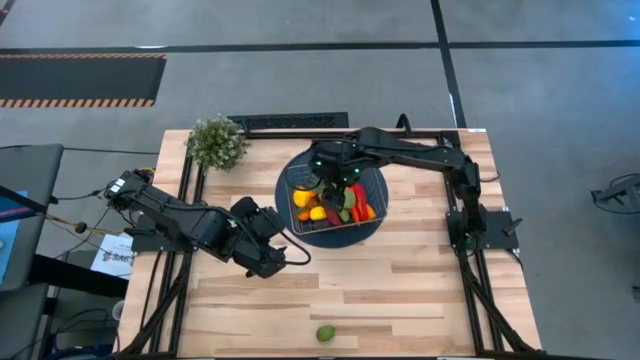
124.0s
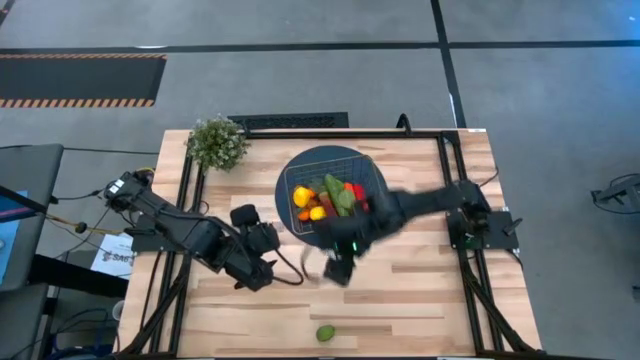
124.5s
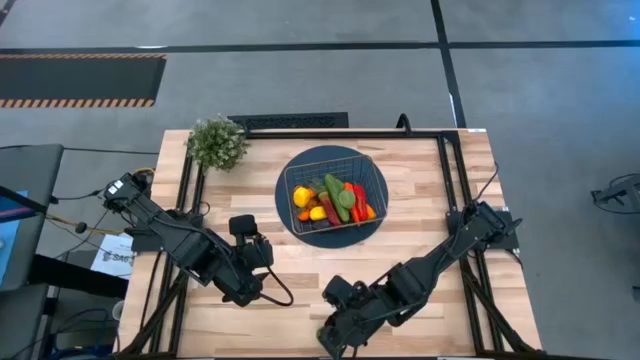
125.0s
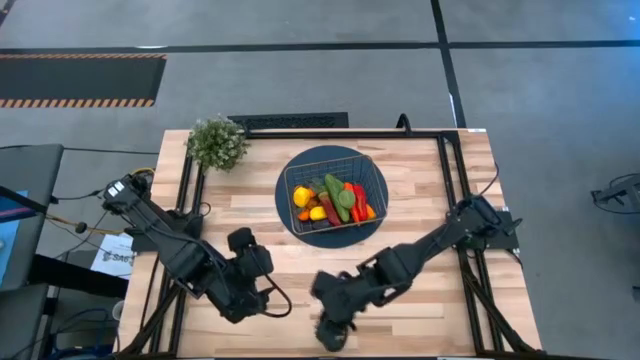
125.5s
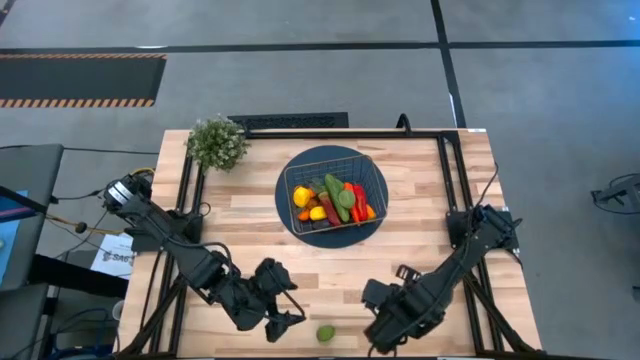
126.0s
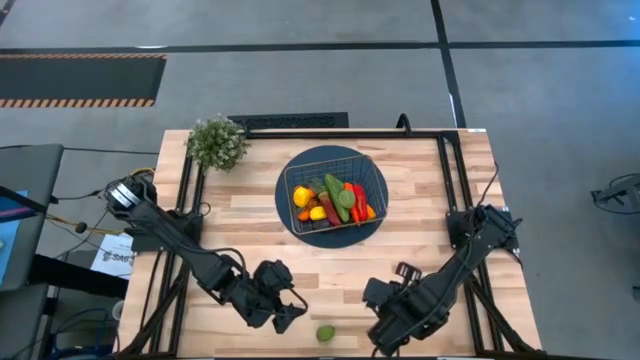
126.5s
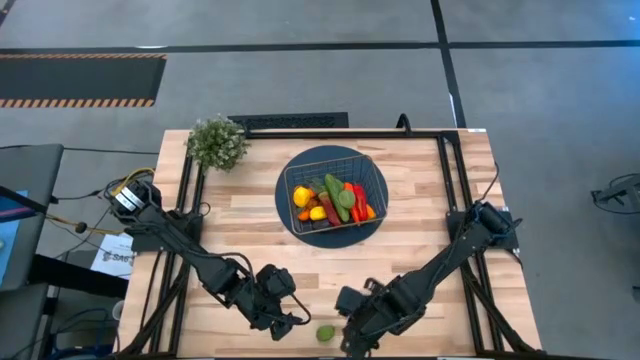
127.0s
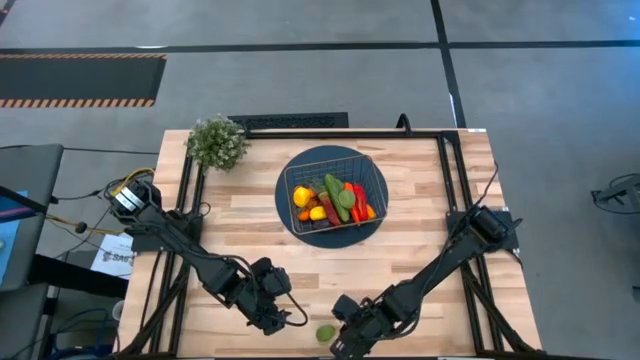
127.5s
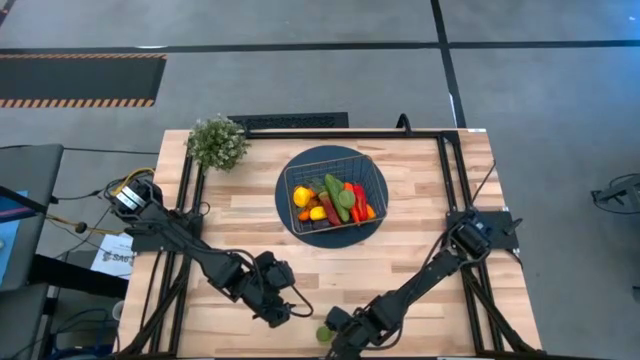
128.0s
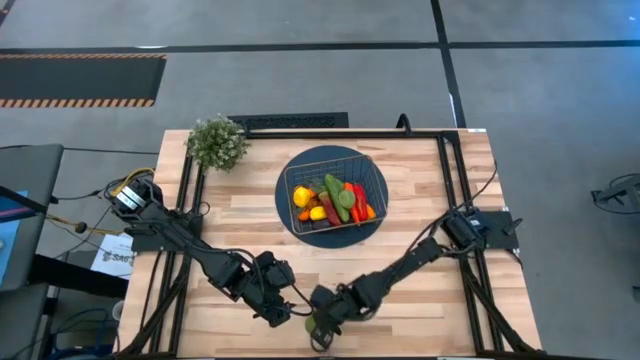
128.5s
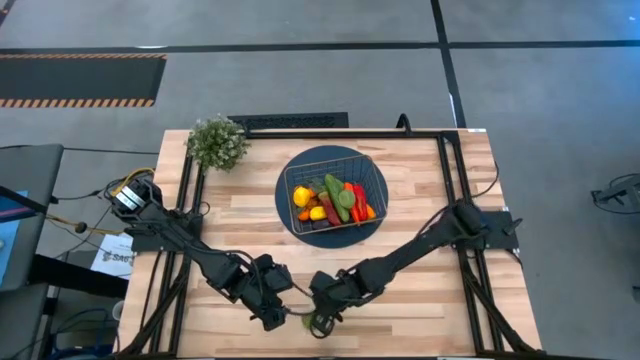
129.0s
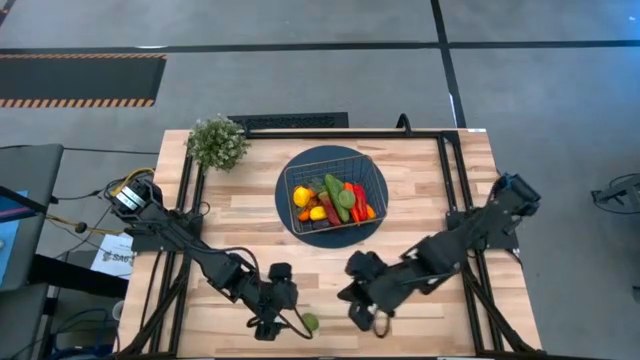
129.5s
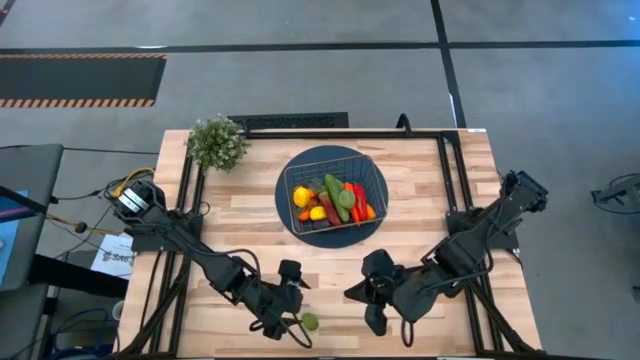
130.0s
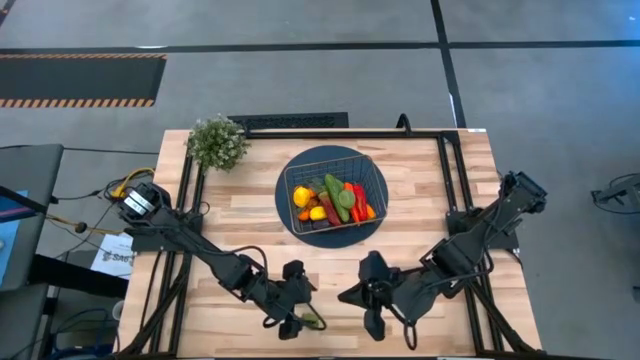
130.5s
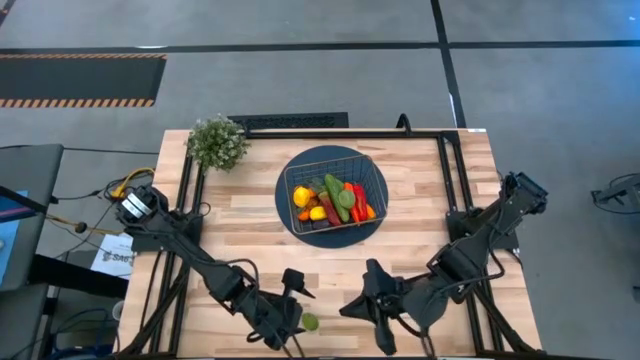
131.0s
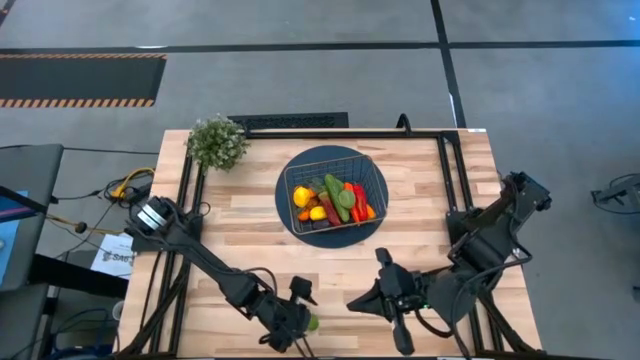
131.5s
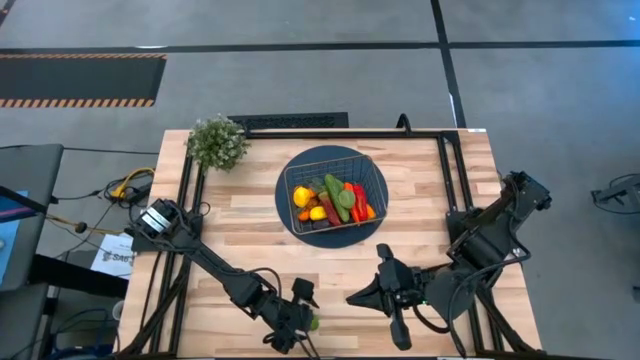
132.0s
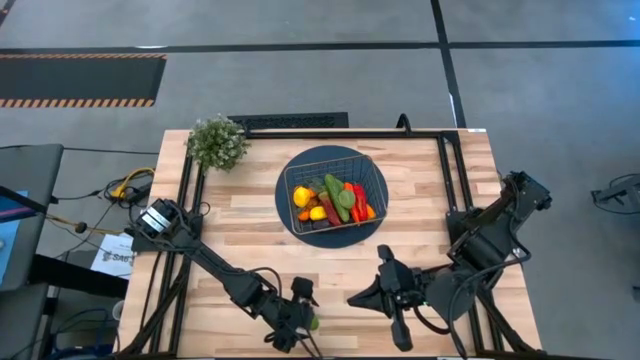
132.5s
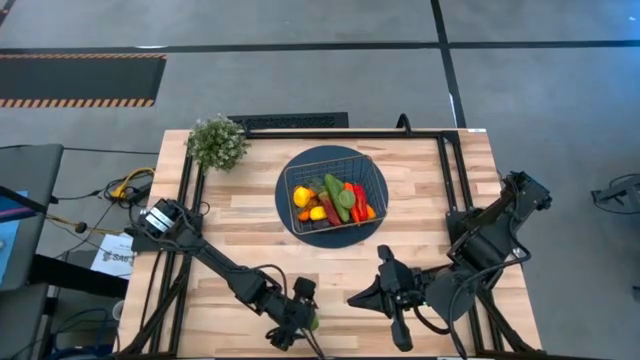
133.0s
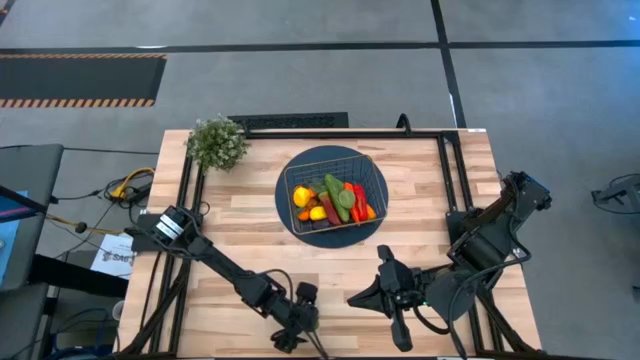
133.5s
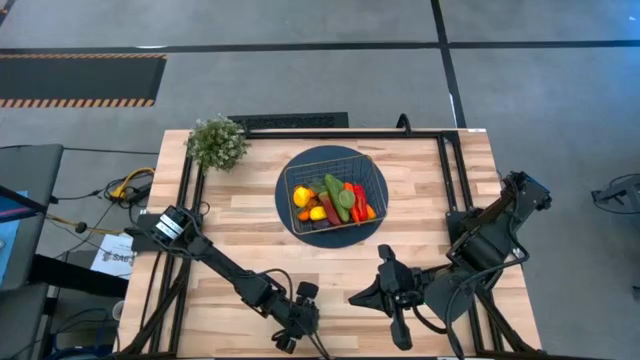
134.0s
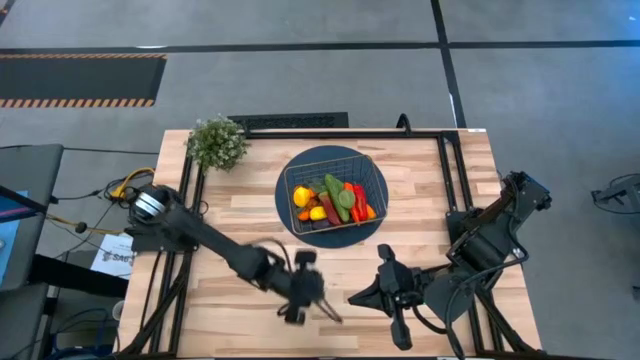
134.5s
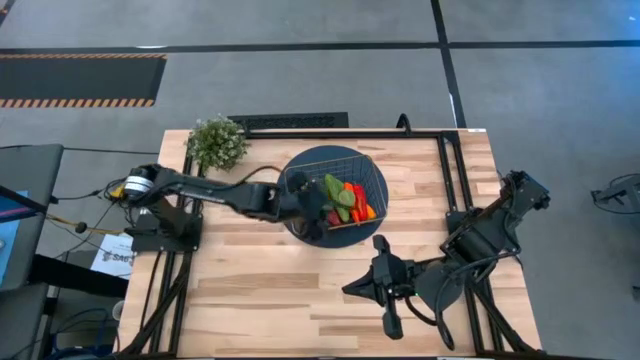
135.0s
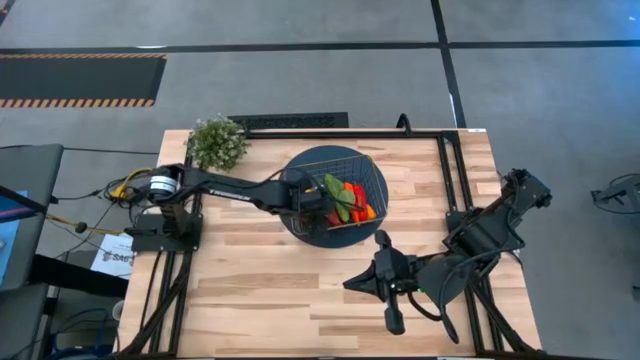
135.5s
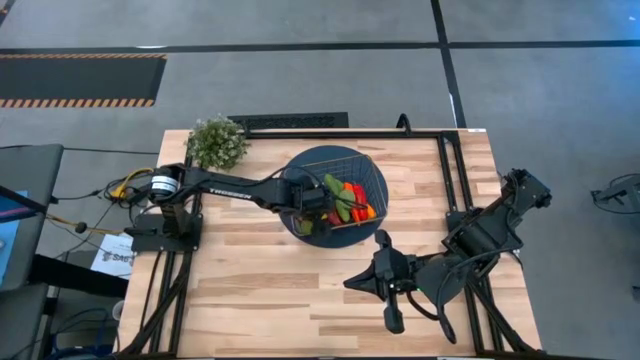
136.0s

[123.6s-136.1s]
Task: Build produce basket
Put the green lemon into the basket

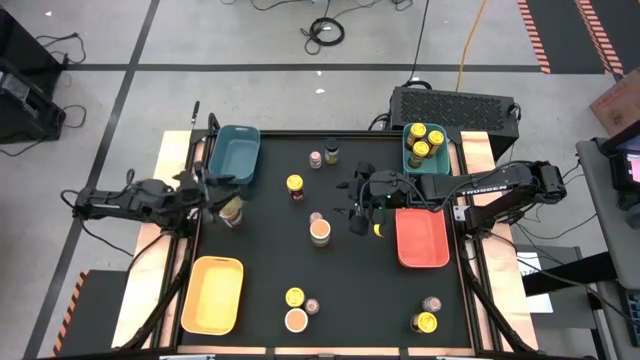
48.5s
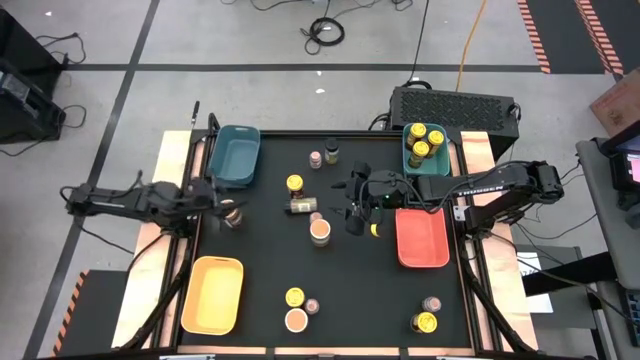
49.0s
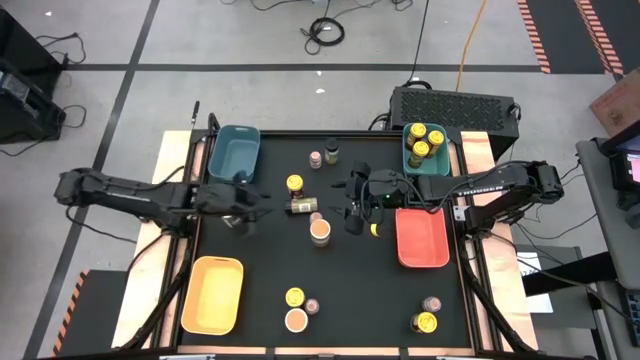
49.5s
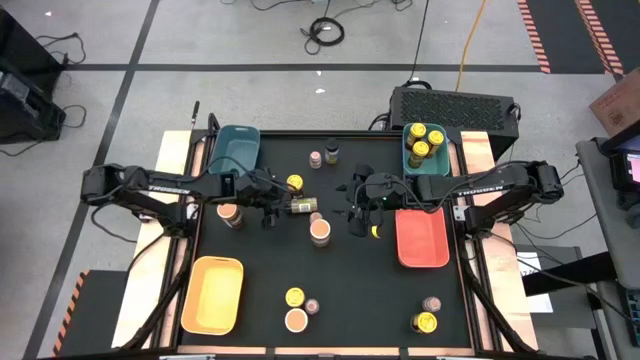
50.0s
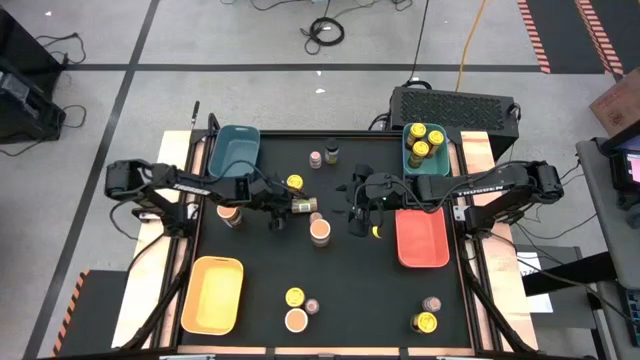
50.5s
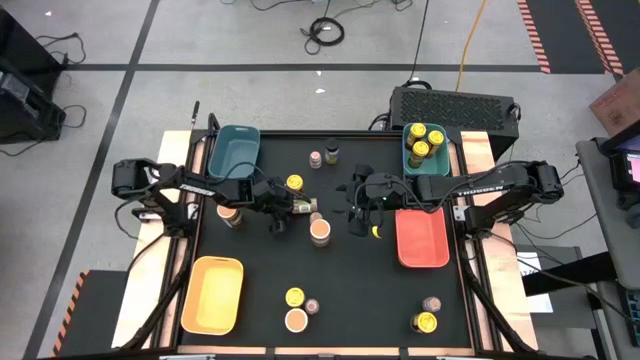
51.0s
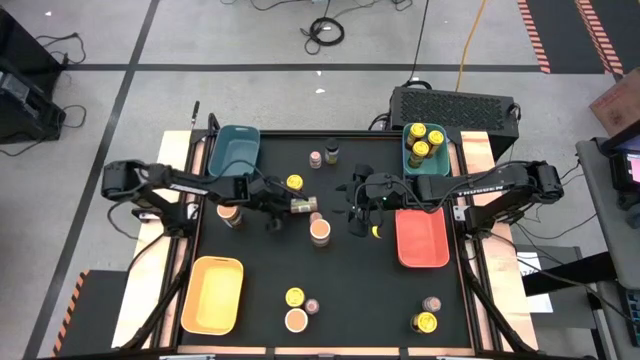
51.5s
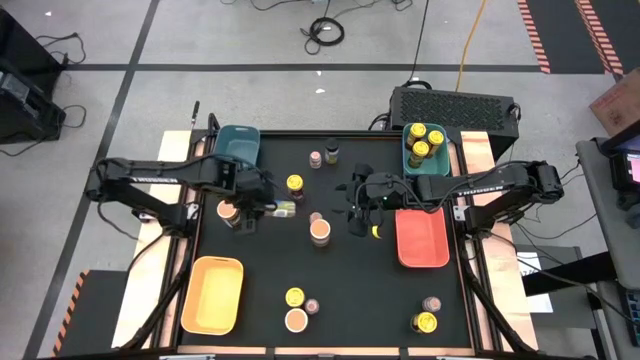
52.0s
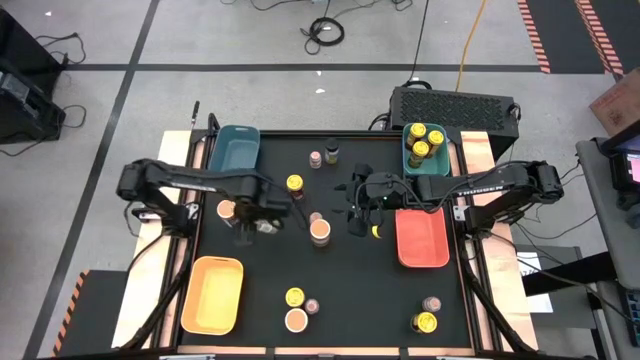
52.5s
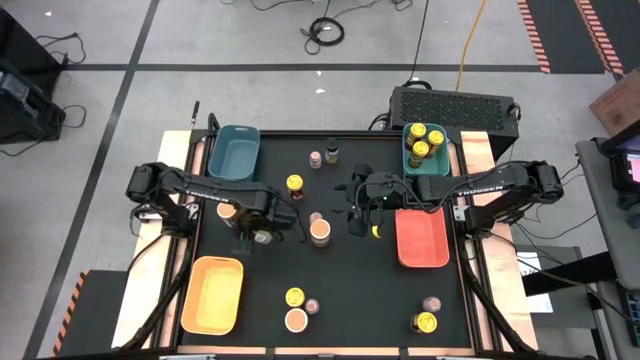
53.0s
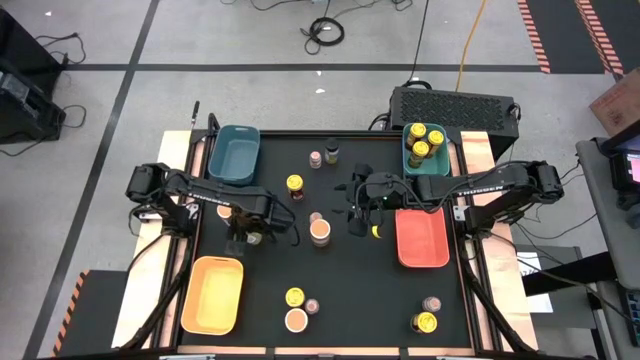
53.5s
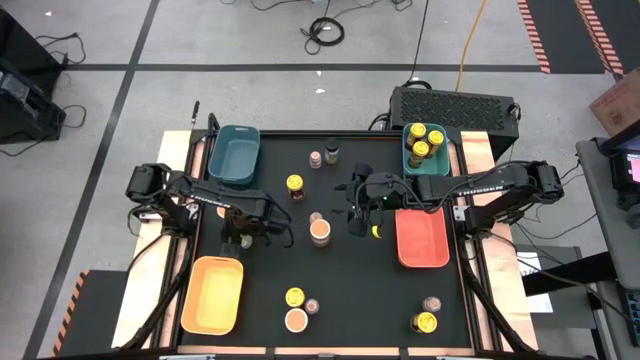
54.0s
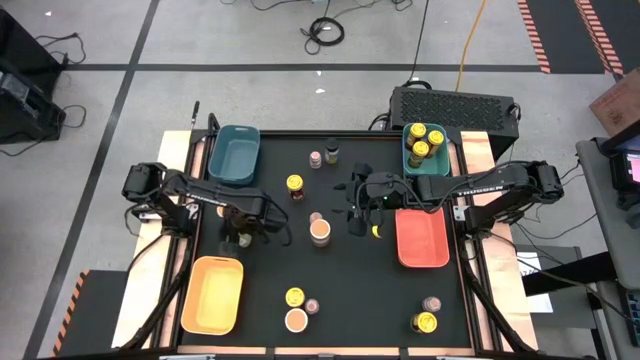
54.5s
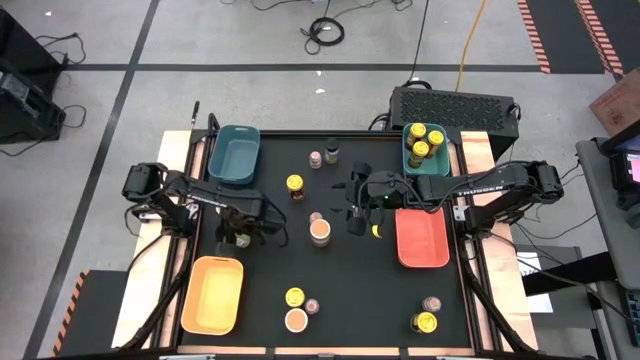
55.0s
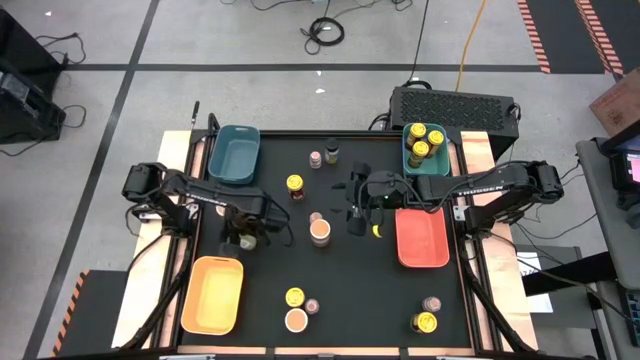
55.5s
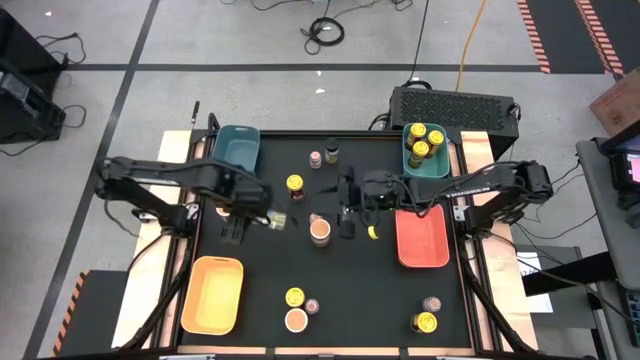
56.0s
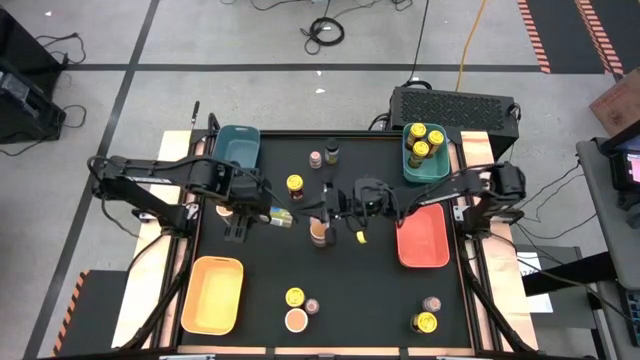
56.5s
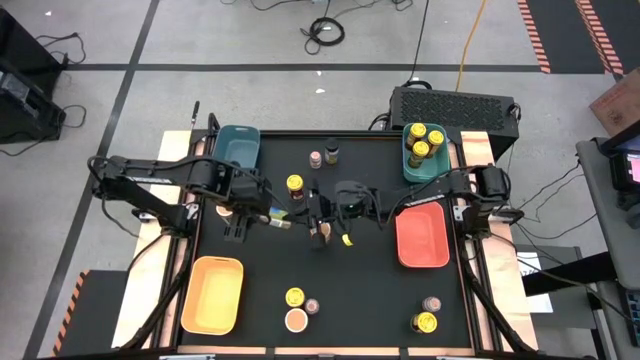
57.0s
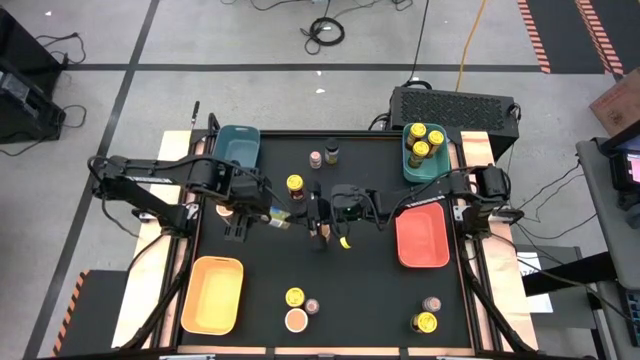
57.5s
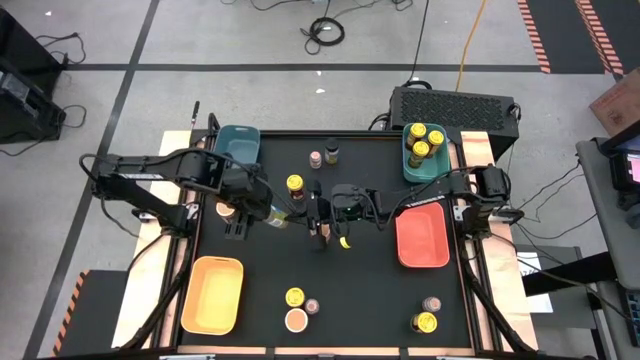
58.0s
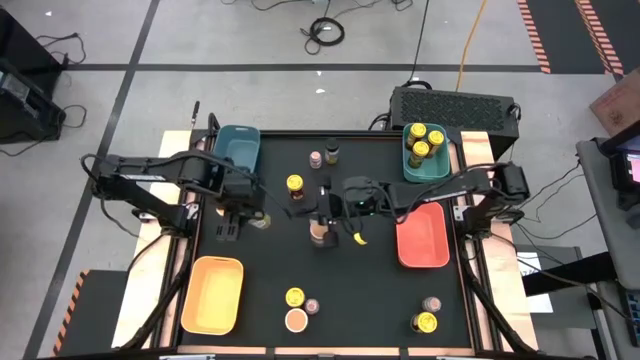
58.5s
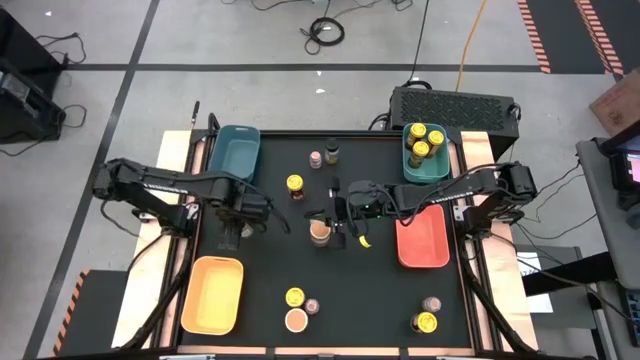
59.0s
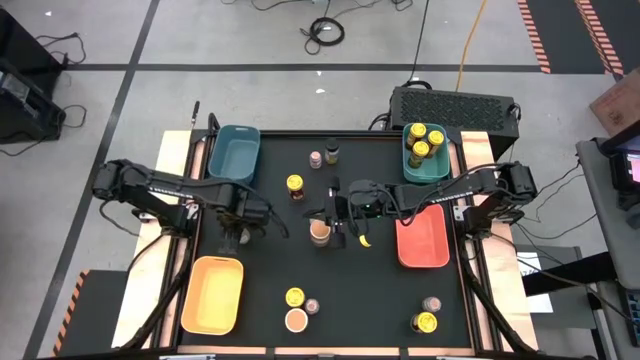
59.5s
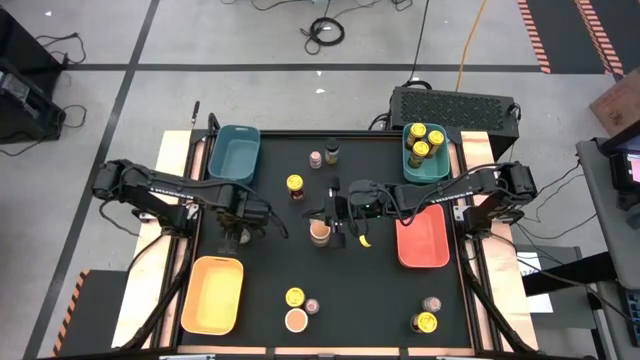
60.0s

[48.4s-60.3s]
Task: Sort spices by type
Adjust the black spice bottle
